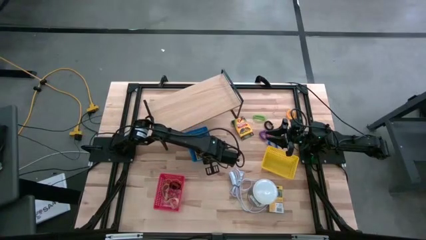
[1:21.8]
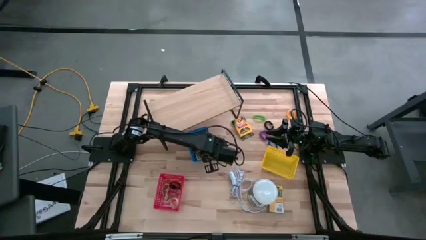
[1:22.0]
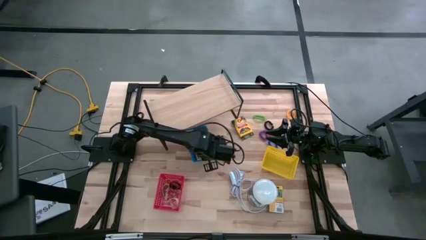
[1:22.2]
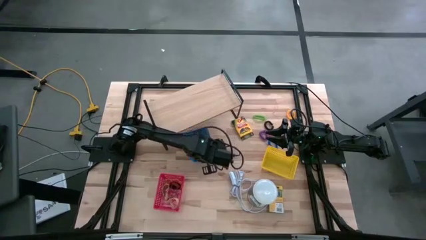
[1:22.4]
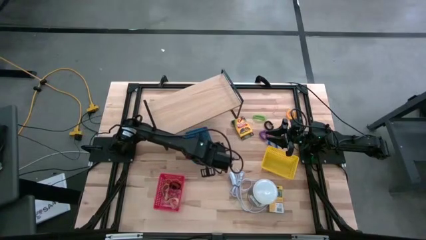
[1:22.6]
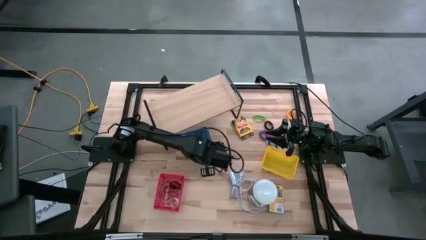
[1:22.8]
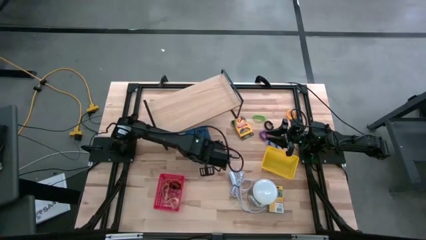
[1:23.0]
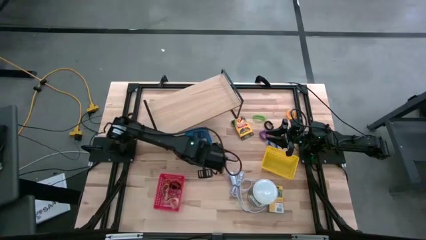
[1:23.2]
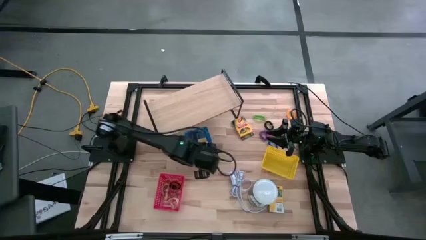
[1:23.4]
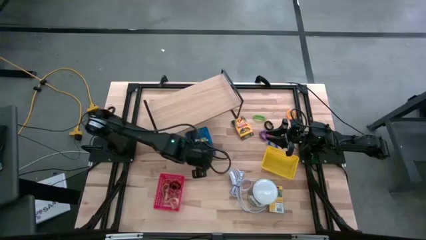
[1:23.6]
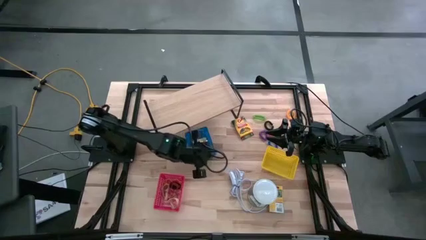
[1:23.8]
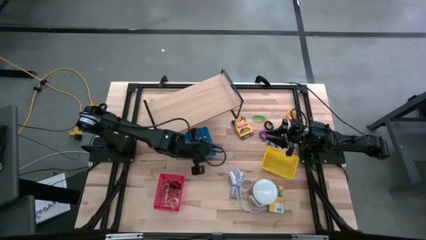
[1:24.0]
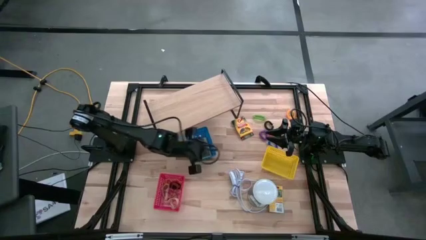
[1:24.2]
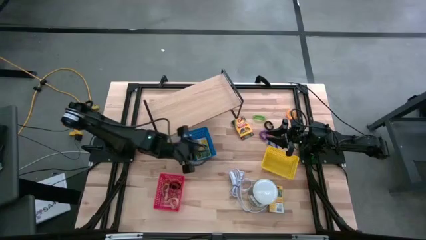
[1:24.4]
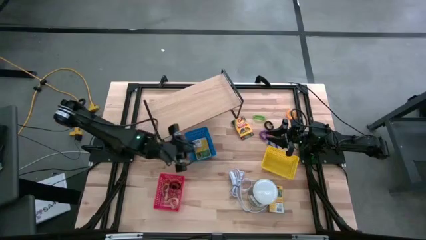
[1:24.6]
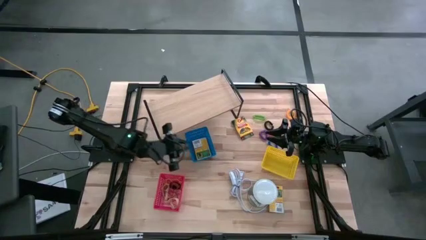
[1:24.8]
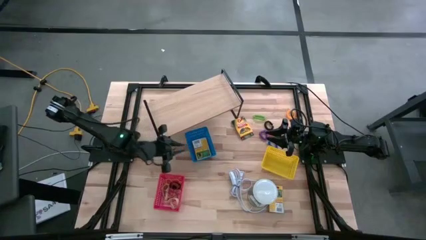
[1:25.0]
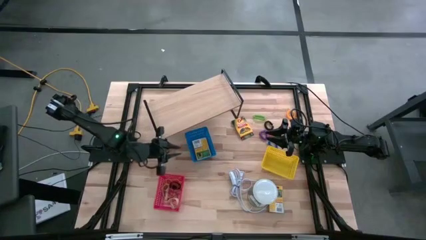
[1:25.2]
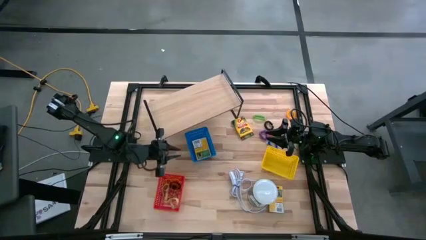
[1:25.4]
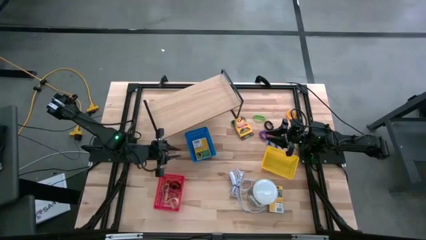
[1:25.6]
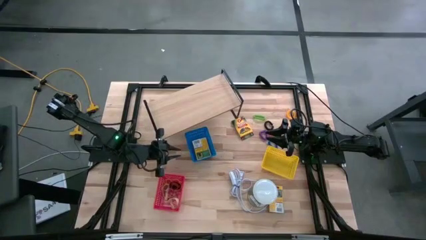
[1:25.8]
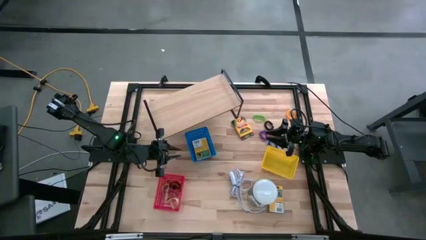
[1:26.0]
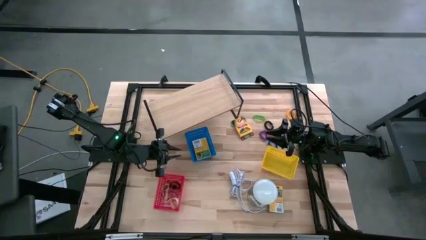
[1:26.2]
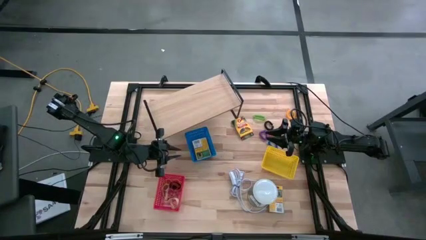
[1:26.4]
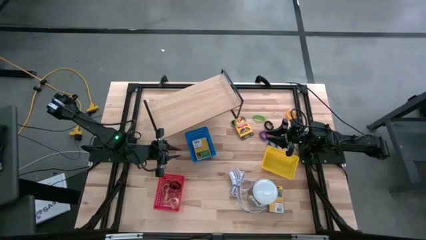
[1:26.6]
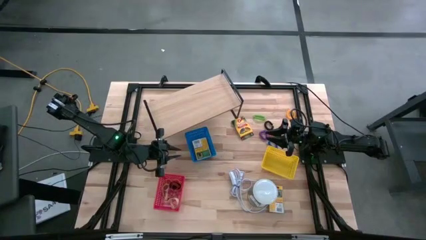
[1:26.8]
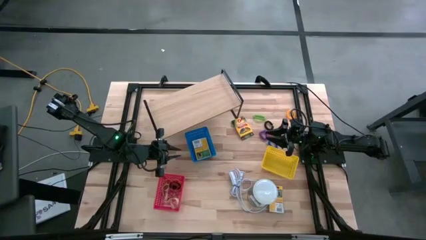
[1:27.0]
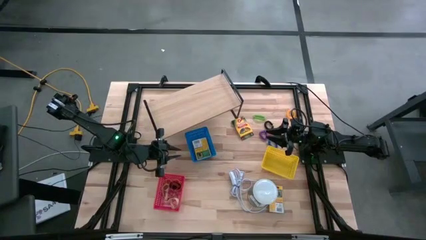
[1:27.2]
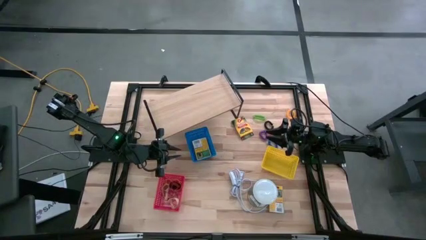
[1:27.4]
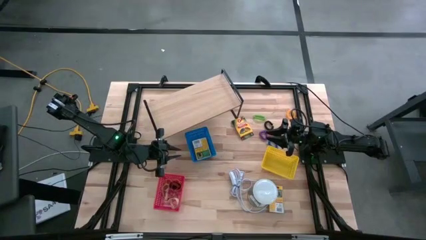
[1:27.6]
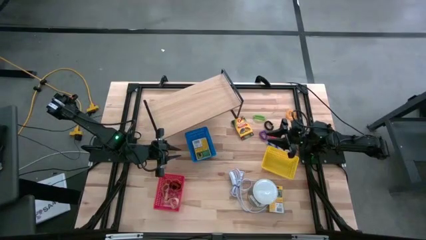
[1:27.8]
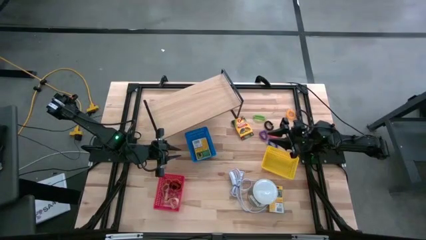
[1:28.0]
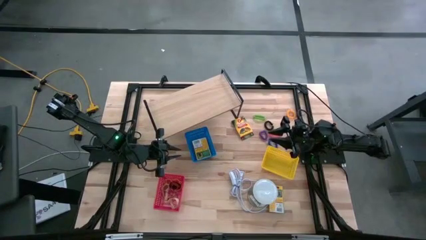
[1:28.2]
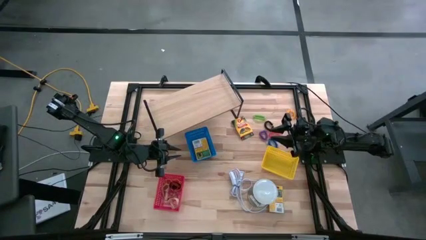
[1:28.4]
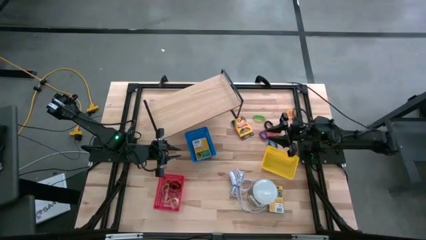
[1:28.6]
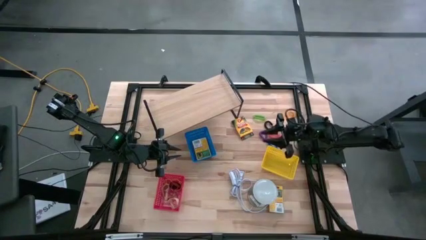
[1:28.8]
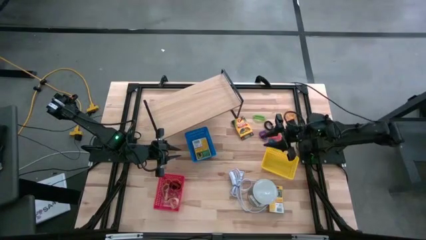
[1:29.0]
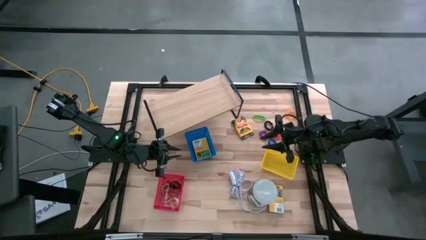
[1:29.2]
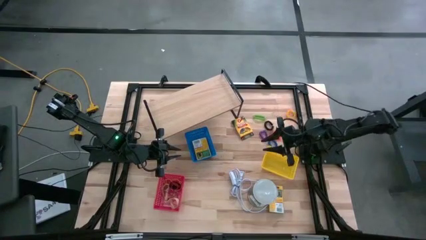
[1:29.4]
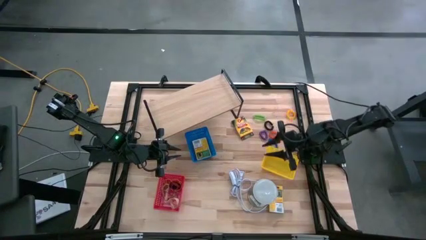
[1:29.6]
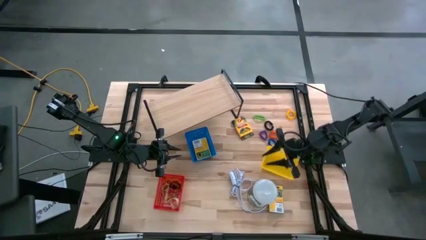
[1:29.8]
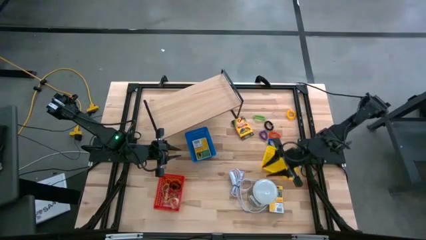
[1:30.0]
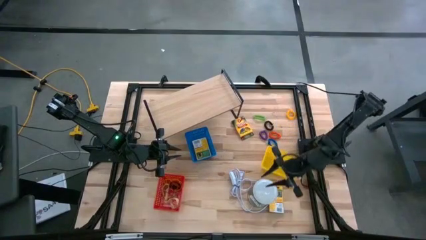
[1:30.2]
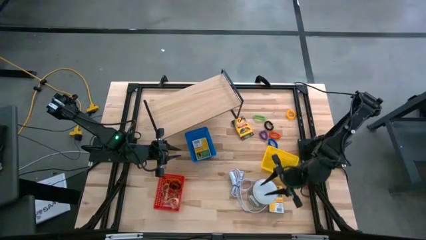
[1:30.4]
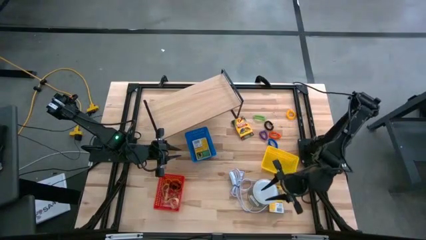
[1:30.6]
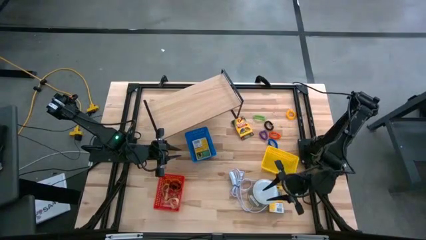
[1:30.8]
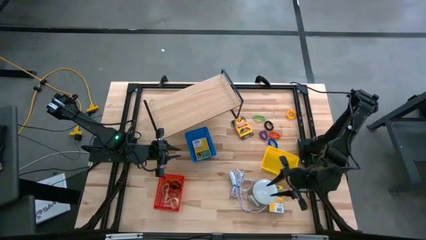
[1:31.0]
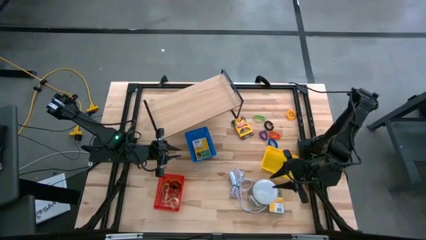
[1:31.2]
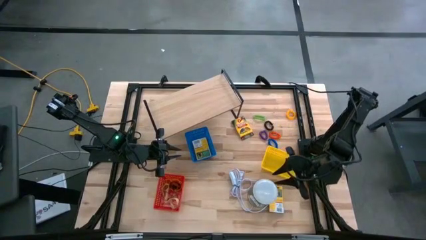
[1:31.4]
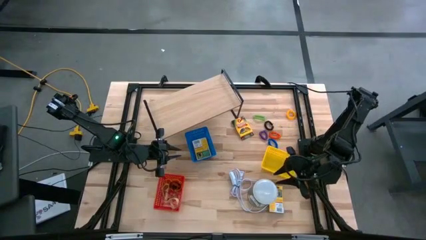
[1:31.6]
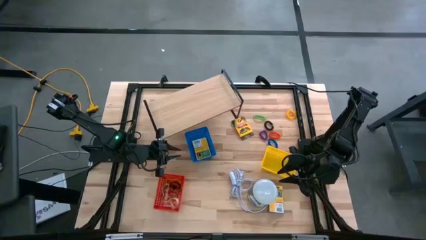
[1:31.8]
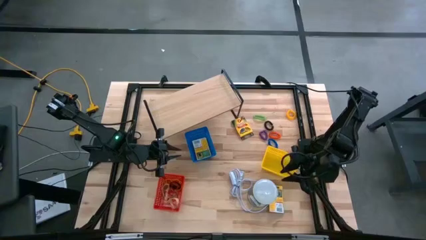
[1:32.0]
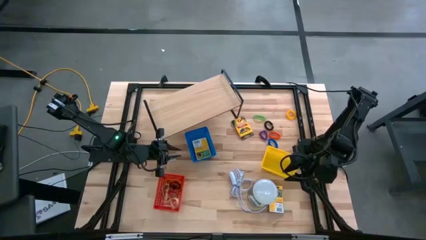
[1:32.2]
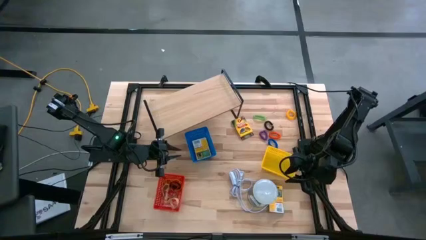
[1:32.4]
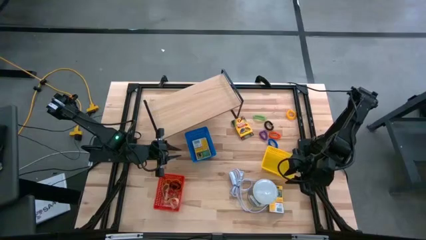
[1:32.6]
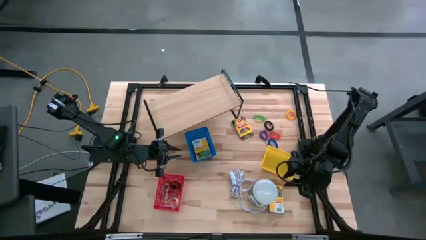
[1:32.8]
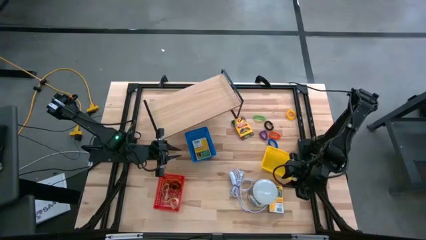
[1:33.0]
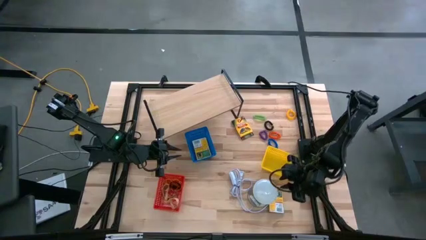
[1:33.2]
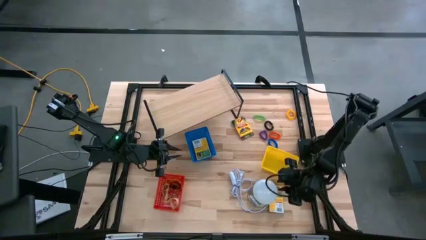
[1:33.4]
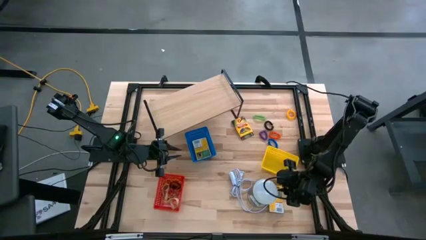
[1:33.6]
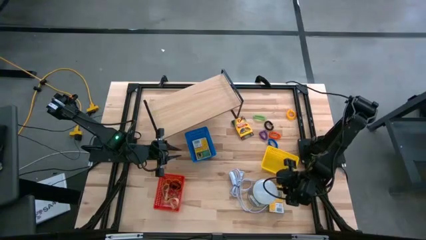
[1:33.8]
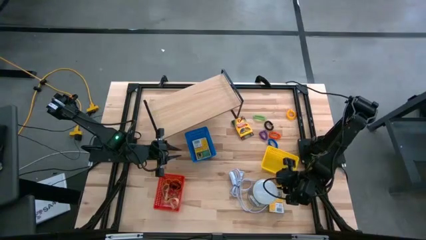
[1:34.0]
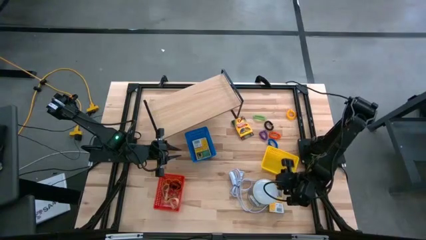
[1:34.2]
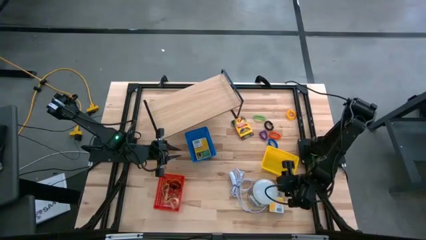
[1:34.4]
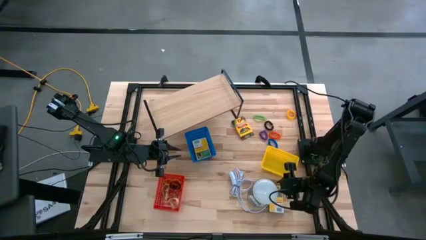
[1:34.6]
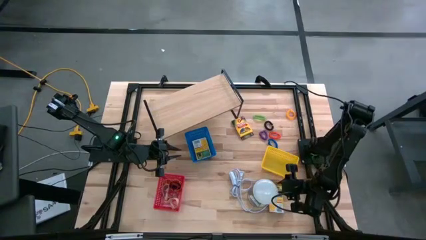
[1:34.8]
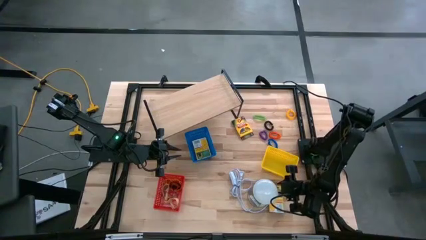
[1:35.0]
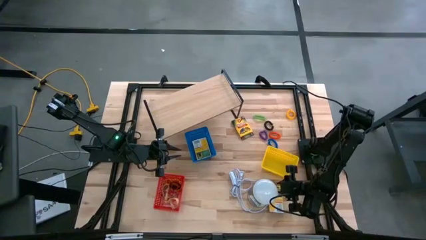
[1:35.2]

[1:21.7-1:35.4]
Task: Pick & Place Office Desk Supplies
Put the yellow pack of crayon into the blue bin

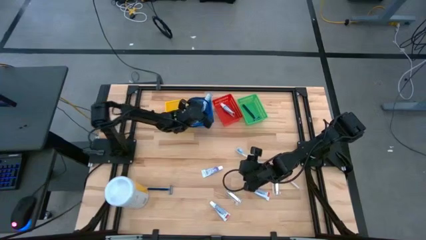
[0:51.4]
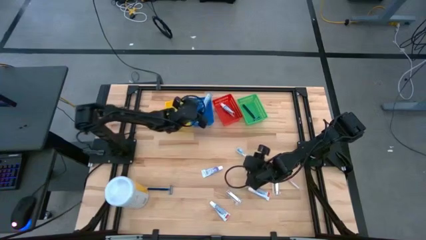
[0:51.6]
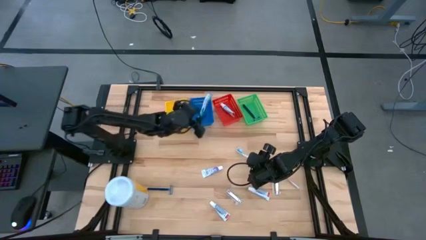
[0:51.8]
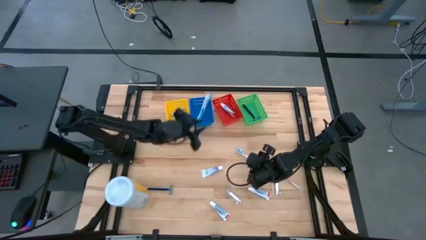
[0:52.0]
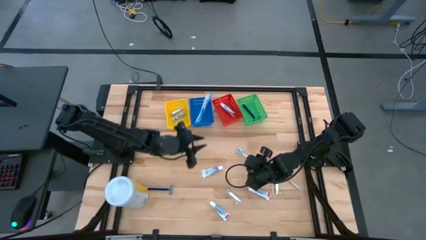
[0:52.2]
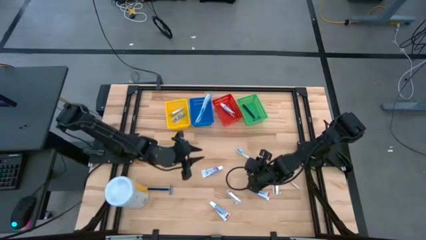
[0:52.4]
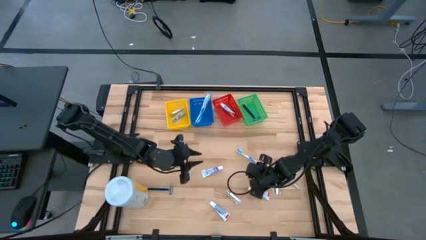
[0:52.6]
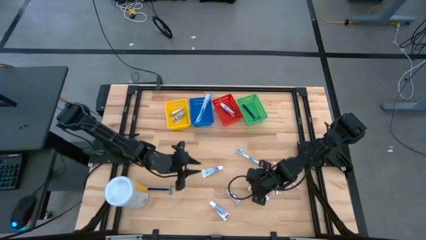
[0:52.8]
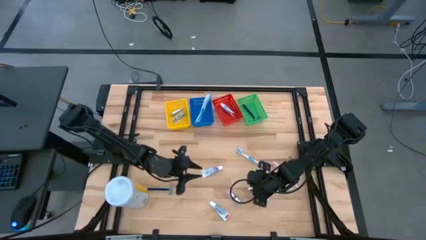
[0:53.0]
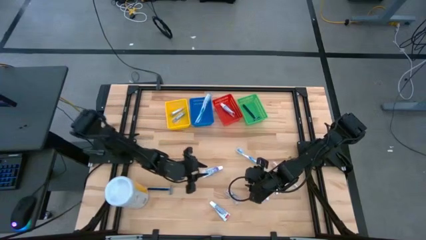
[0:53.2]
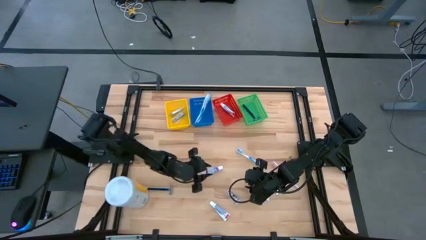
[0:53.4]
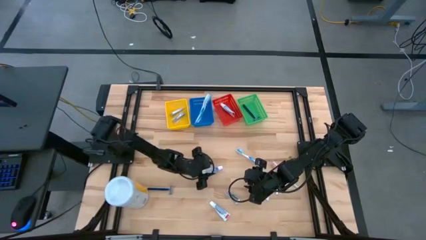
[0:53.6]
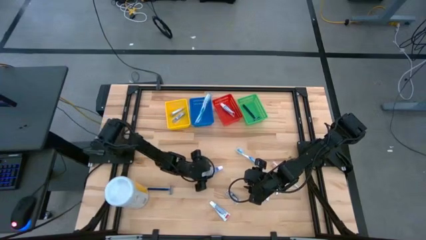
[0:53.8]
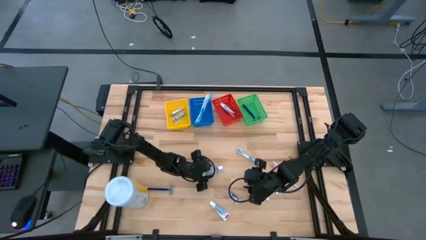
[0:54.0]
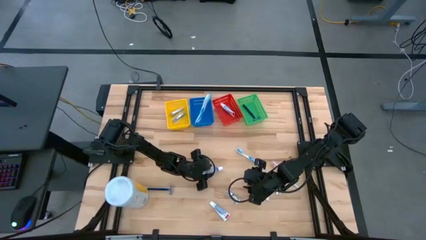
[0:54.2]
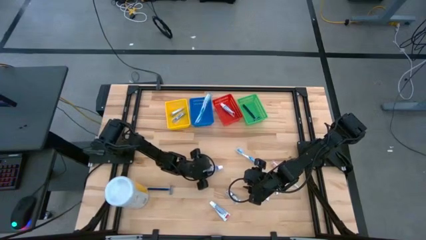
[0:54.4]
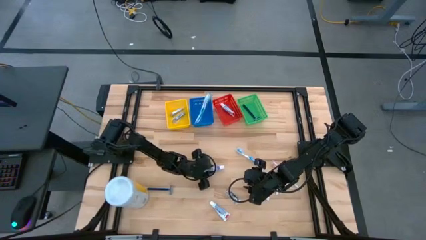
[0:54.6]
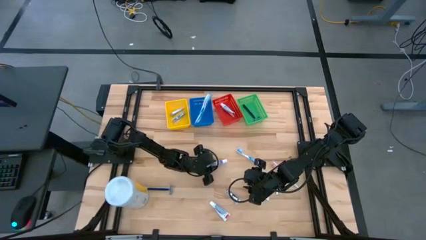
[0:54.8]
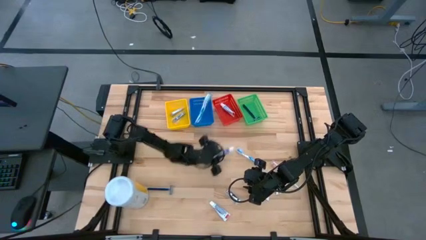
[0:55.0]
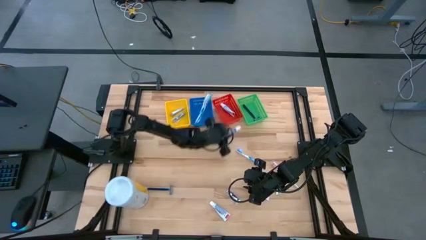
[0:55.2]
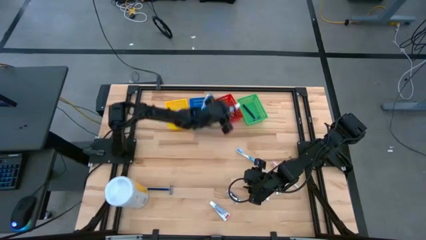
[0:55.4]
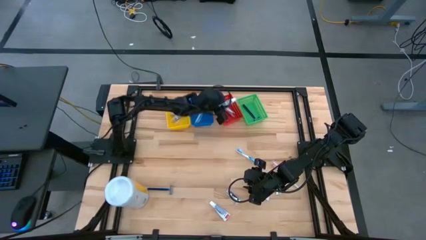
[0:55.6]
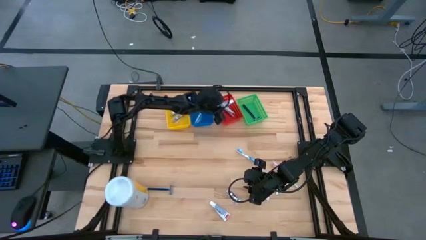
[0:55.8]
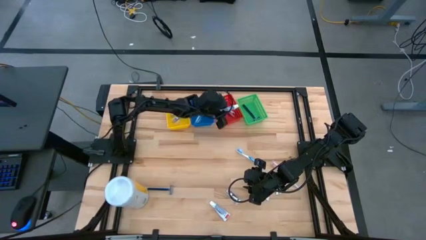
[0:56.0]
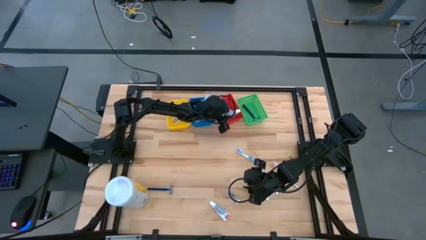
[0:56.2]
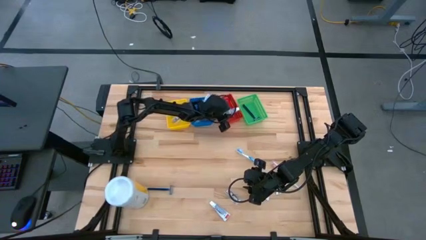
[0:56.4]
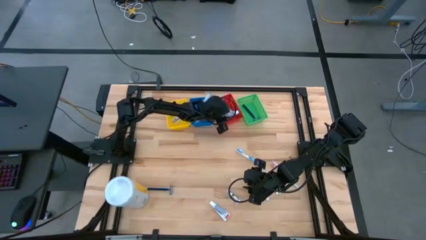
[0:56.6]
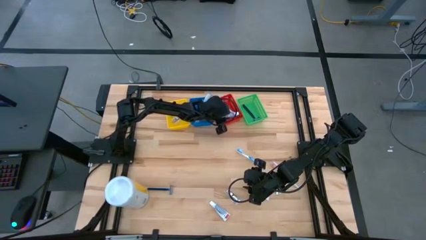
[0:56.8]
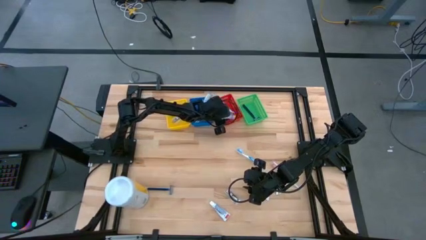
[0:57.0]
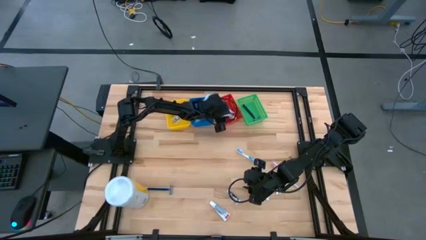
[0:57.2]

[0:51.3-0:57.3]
Task: Pick & Place Travel size toiletries
Put the top left toothpaste into the red bin
